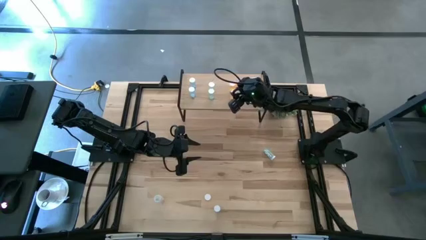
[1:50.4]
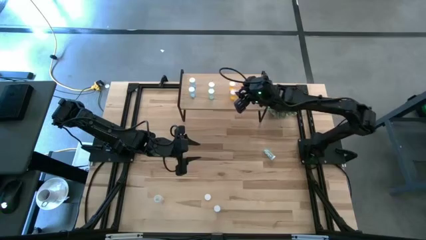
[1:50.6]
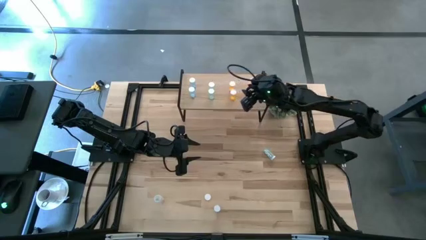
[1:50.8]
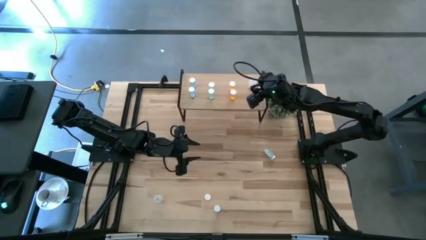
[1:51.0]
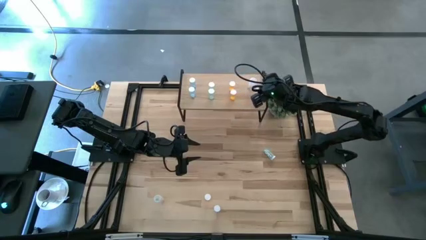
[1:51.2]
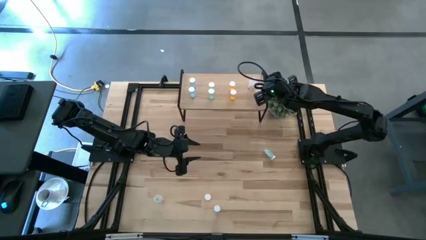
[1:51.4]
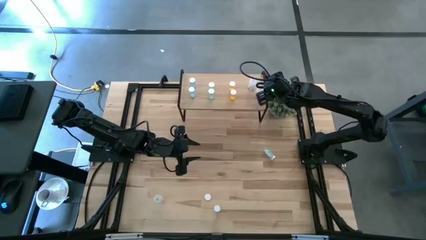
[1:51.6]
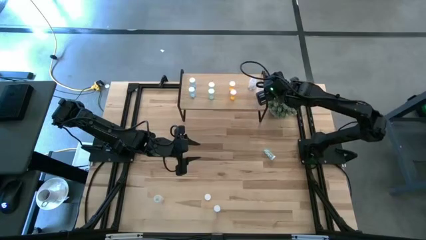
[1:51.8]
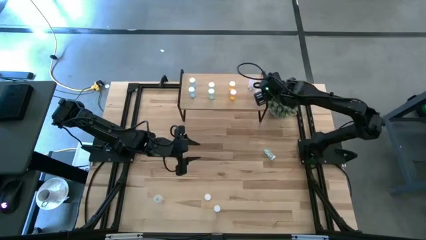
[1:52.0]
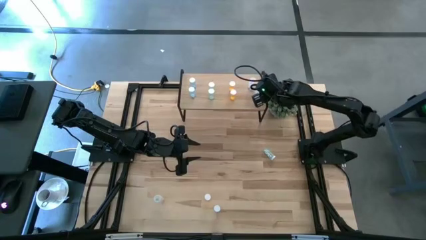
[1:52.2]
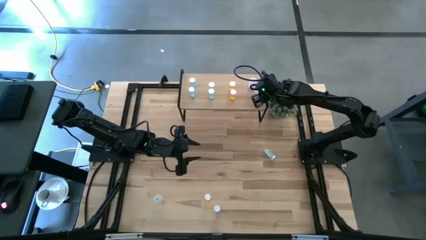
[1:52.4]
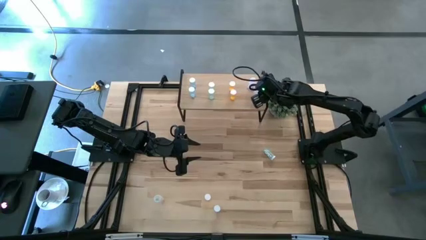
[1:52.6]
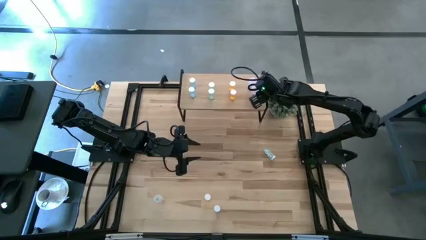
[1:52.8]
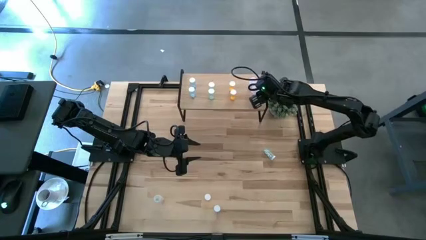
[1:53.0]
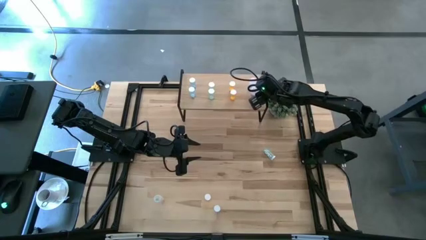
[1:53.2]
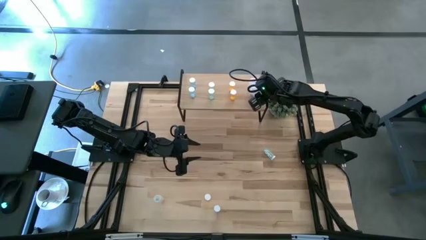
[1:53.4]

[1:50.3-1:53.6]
Task: Pick and place medicine bottles onto shelf by color
Adjust the transparent pill bottle

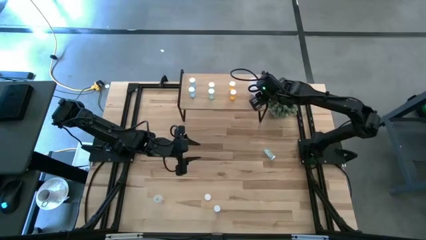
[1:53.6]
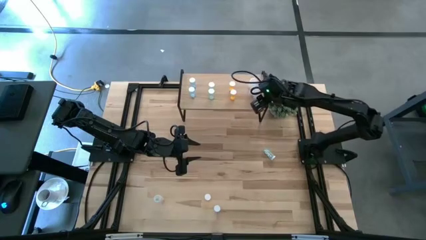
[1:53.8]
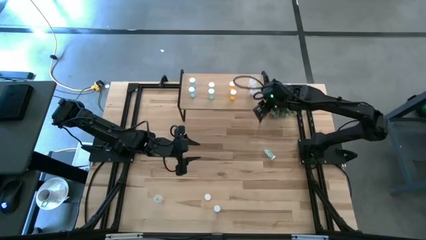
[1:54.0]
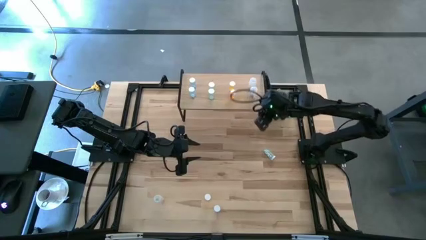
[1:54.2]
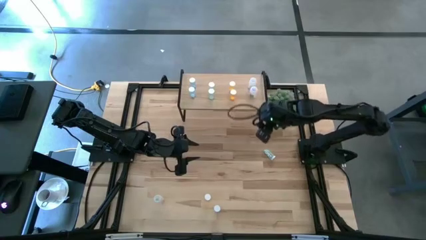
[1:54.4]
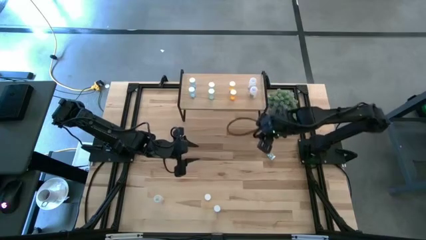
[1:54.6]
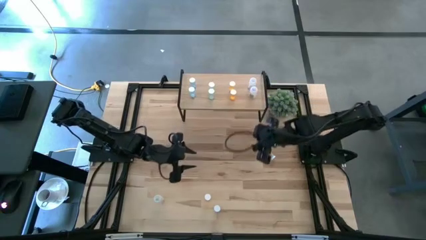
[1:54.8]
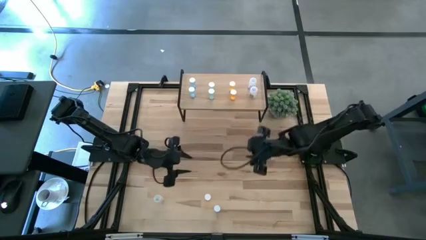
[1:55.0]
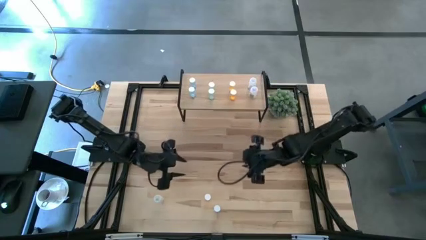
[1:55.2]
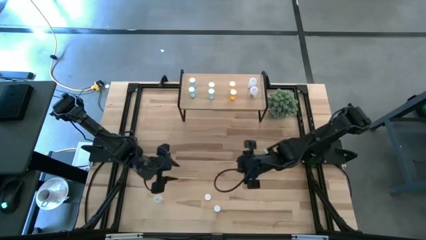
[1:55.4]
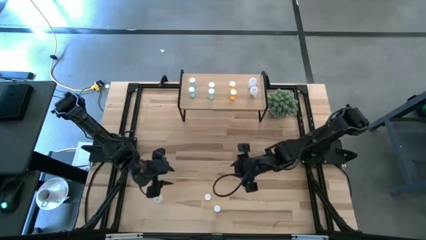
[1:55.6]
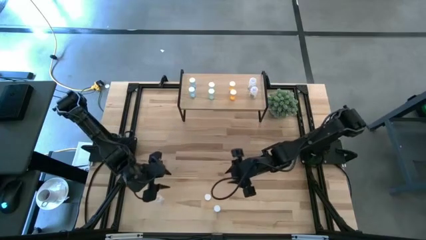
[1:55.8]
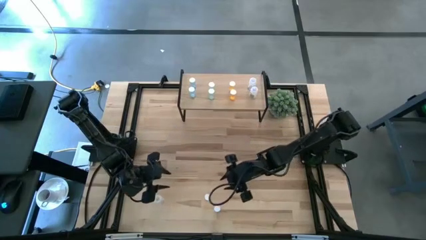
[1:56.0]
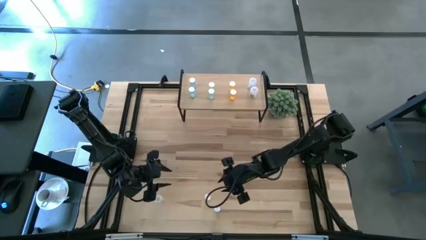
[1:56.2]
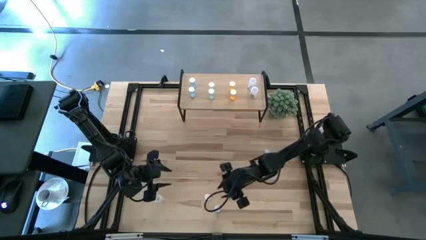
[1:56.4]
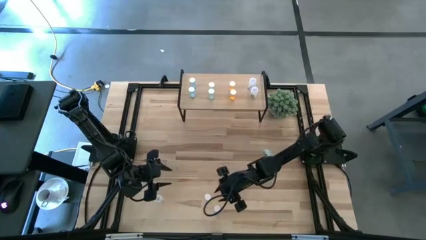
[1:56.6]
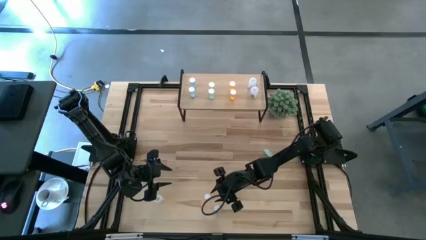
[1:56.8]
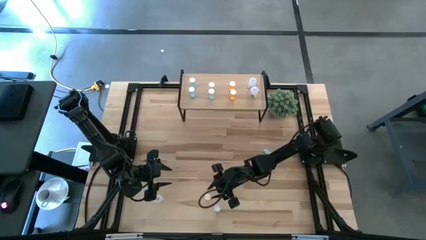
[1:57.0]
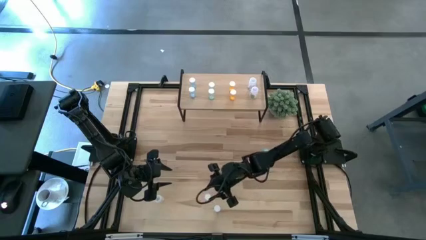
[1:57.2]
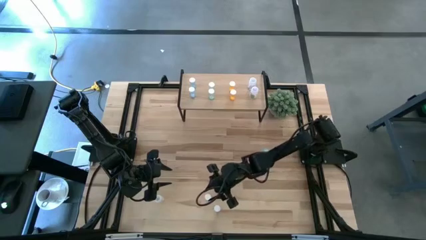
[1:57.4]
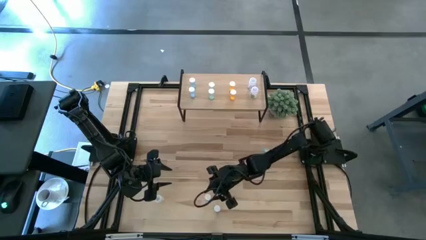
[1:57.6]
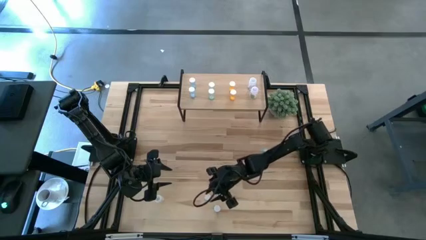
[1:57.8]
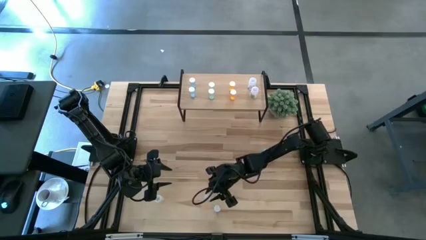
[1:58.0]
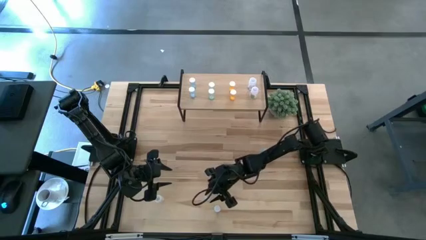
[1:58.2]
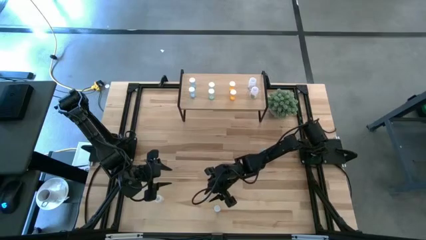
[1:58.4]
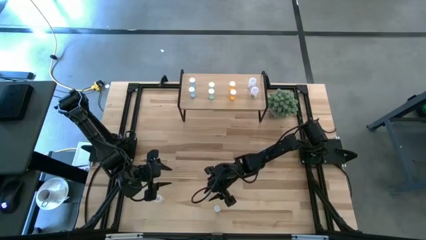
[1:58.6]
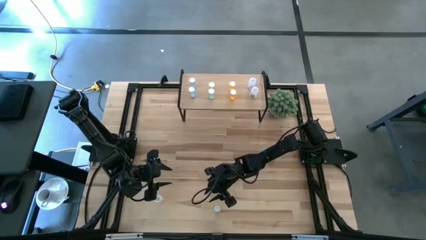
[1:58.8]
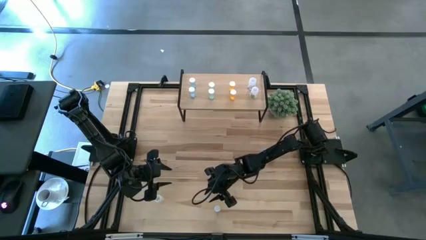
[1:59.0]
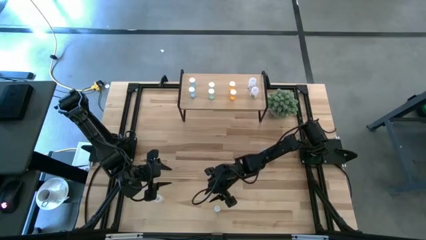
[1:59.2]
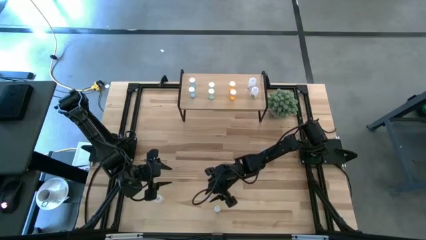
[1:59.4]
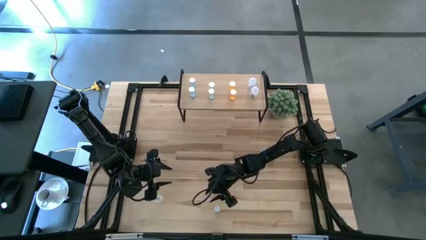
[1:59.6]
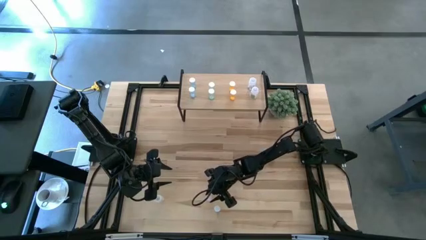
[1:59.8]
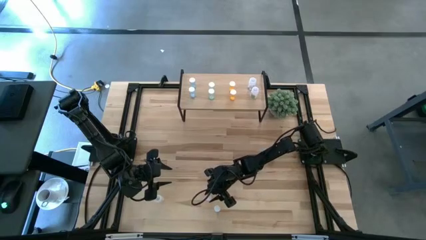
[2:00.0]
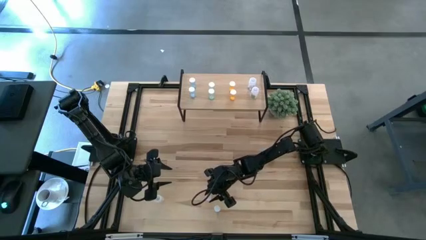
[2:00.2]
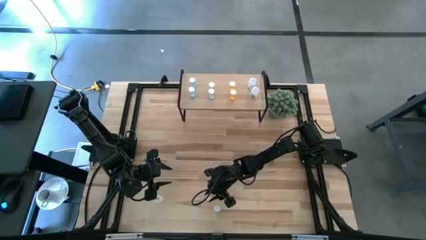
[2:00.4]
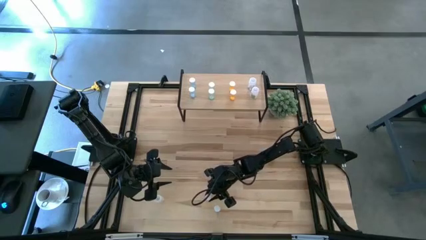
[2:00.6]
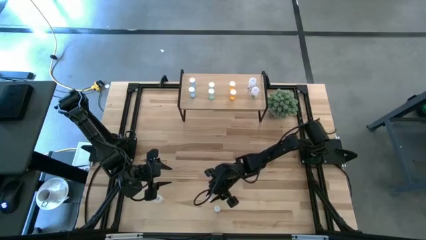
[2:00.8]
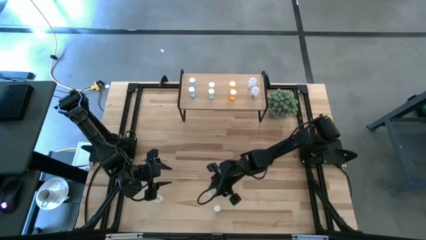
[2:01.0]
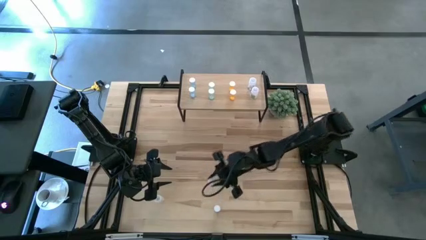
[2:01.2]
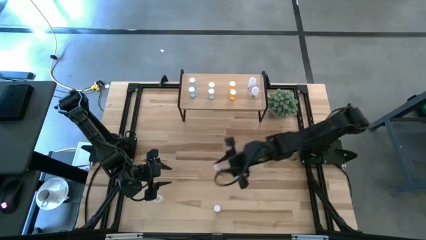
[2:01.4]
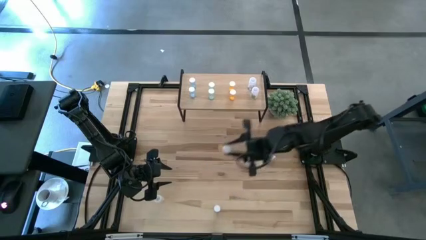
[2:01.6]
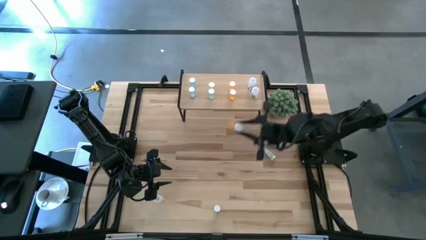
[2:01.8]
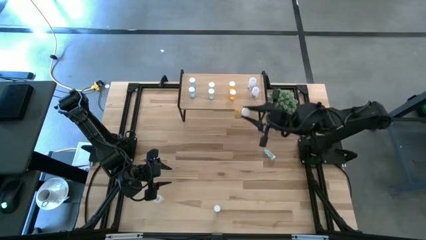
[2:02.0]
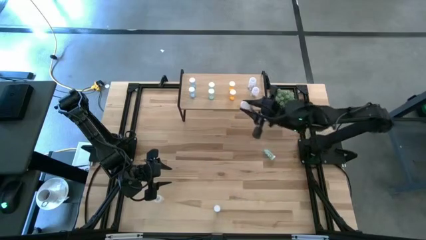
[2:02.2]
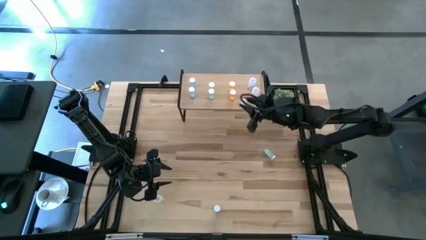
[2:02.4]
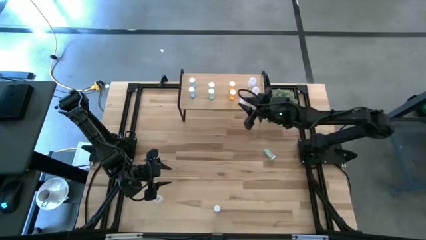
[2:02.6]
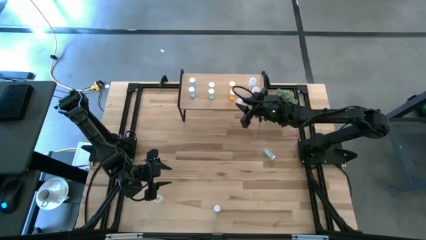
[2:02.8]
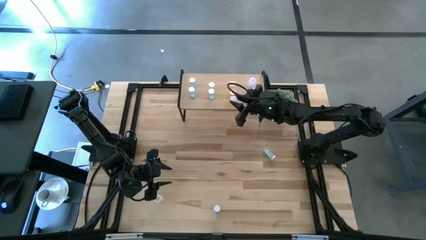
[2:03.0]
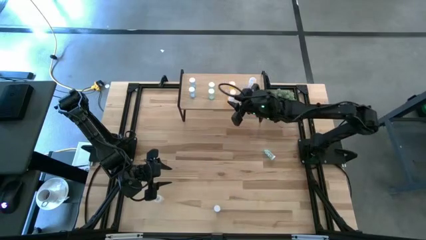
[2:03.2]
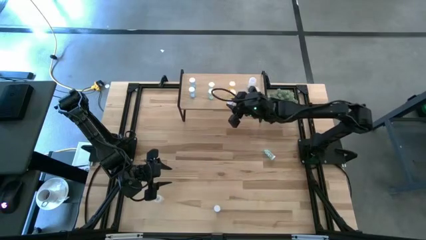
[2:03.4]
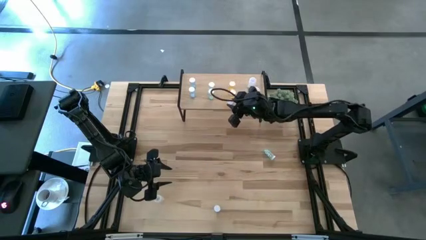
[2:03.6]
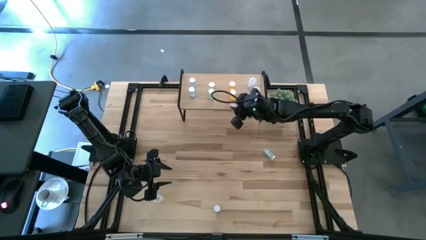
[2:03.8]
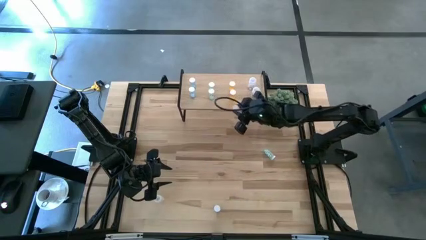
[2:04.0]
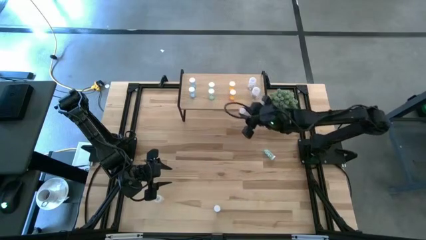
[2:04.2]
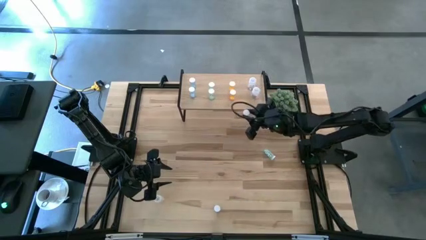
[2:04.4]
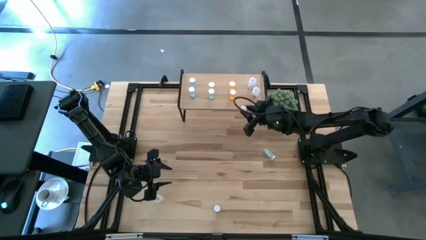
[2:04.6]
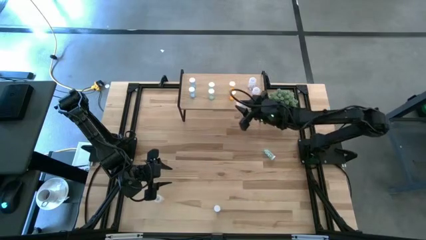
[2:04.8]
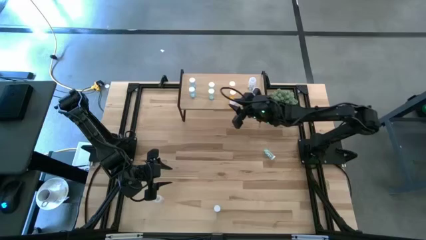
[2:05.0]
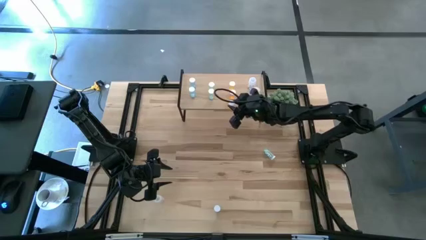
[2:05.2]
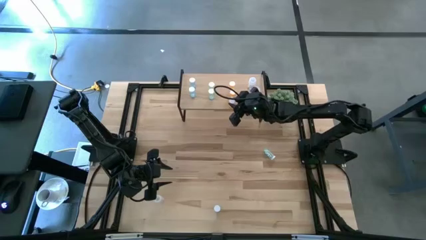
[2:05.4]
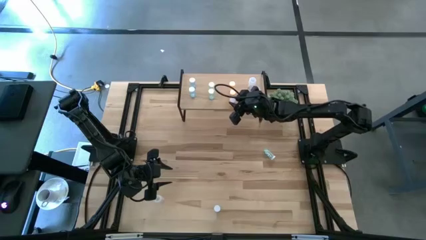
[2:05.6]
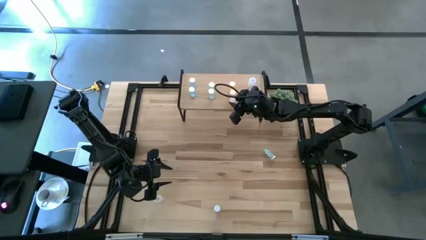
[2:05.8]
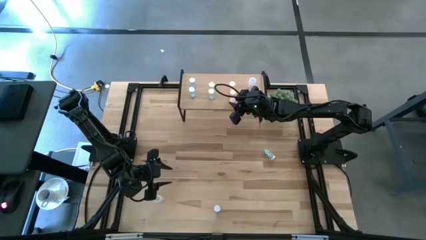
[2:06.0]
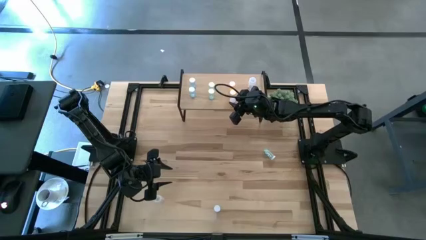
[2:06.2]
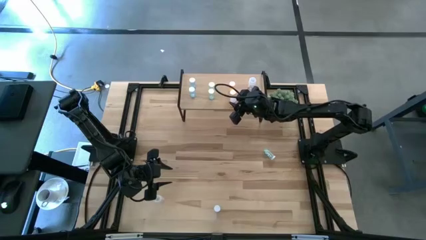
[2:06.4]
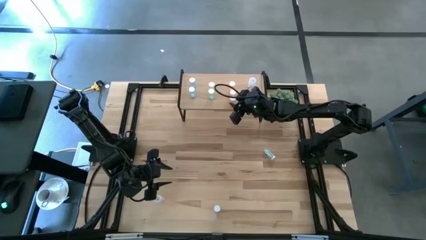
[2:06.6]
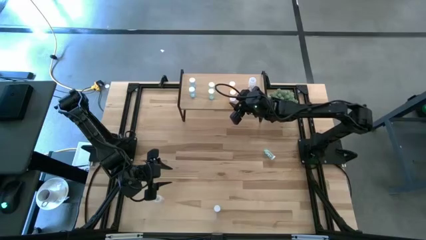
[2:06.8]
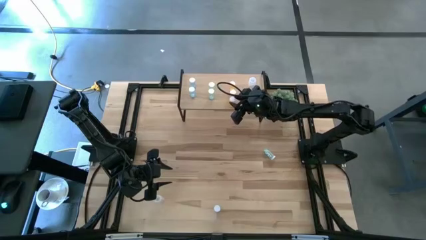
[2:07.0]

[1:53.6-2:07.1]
Put the orange pill bottle on the shelf aligned with the other orange pill bottles

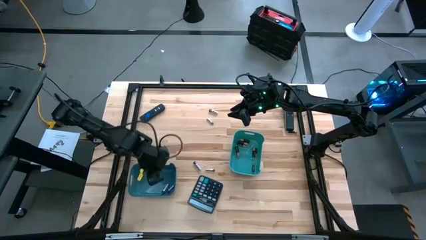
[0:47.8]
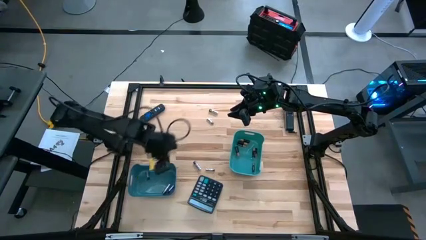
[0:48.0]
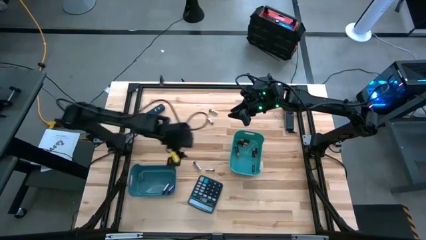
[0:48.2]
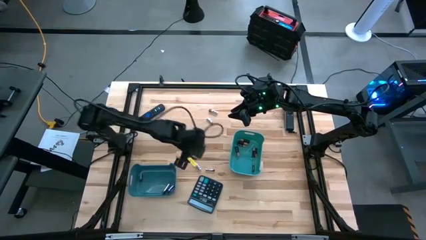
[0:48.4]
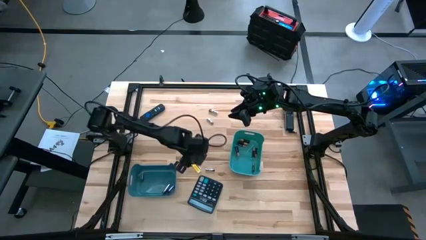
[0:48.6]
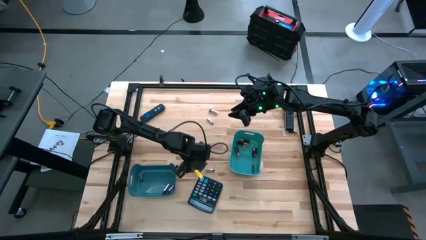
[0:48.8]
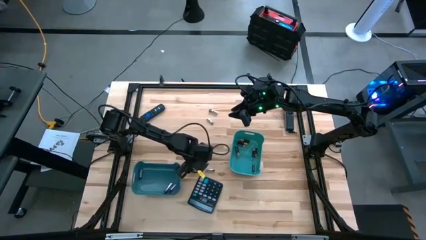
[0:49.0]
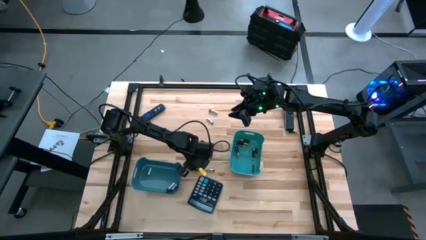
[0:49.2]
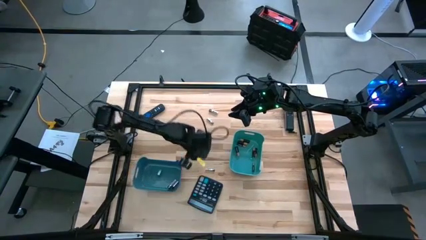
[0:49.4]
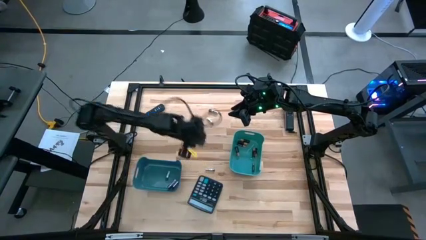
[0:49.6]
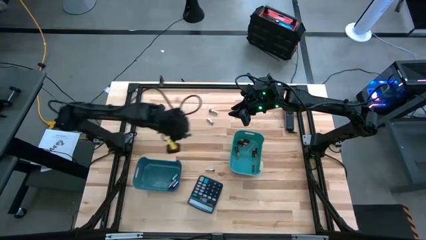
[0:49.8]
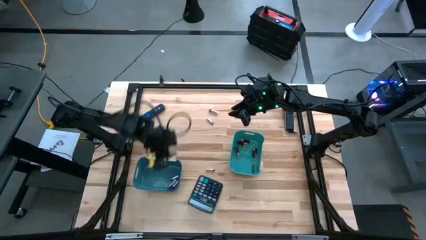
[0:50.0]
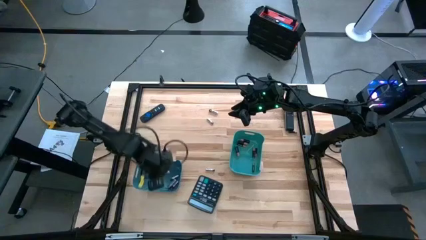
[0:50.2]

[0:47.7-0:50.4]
Task: Sort batteries
Put the silver battery into the dark blue bin
